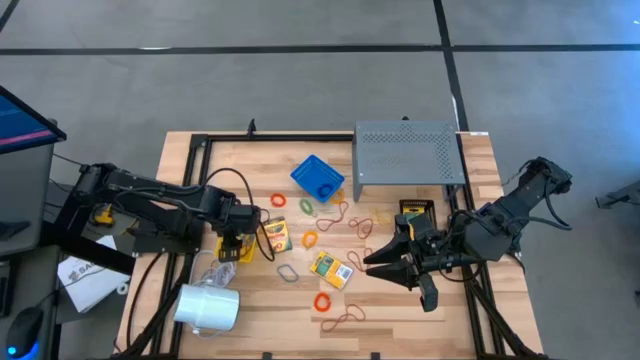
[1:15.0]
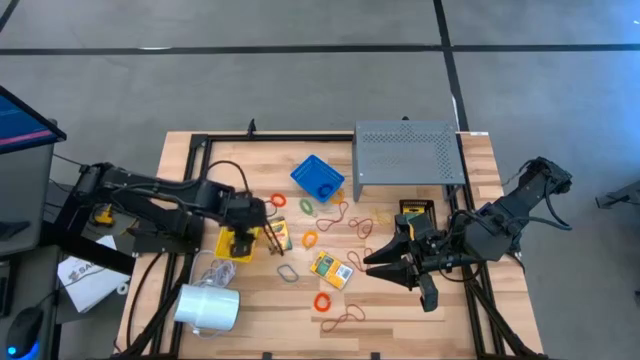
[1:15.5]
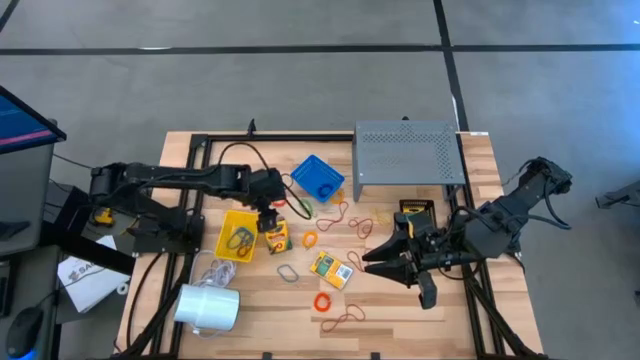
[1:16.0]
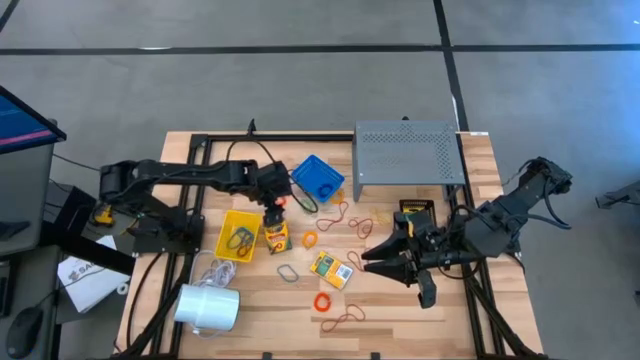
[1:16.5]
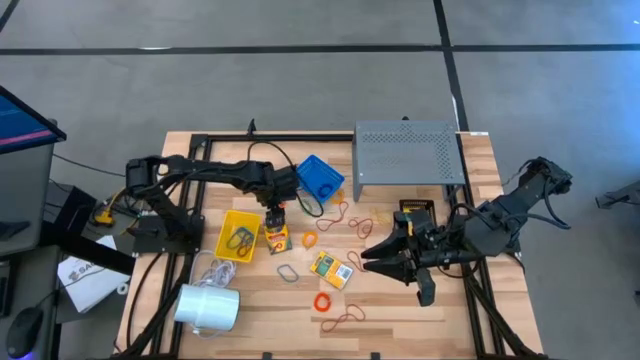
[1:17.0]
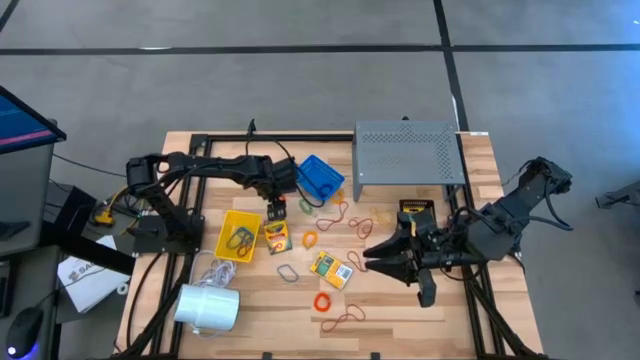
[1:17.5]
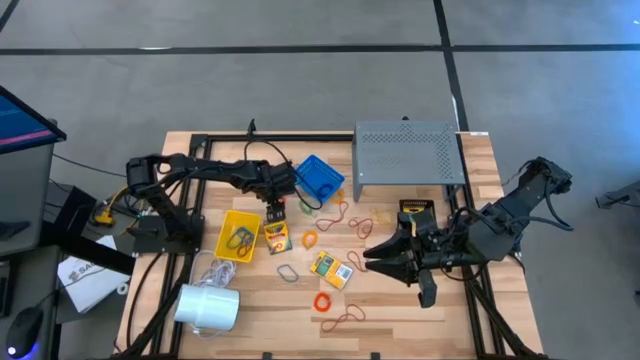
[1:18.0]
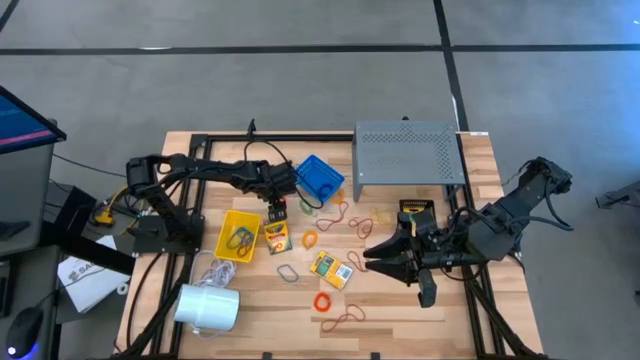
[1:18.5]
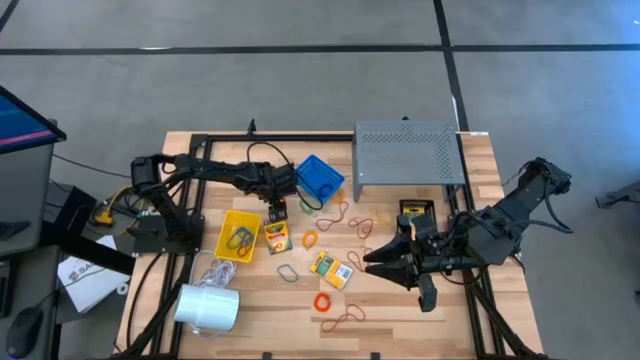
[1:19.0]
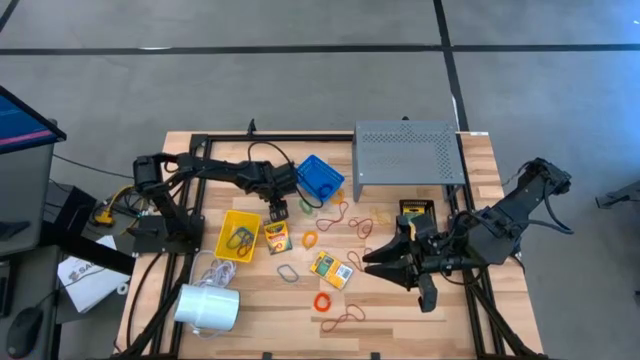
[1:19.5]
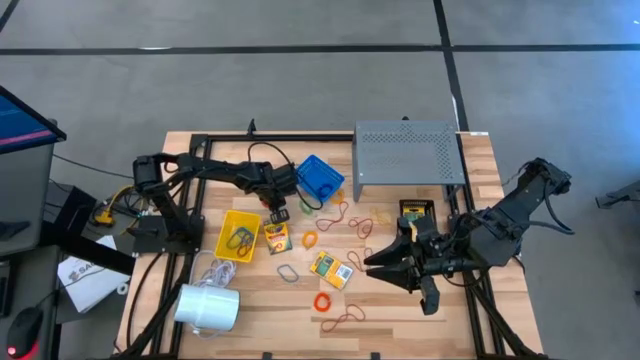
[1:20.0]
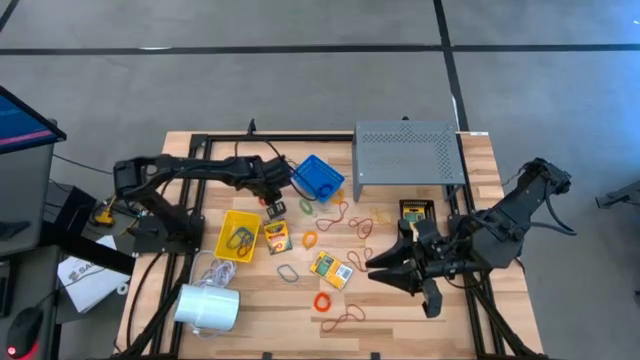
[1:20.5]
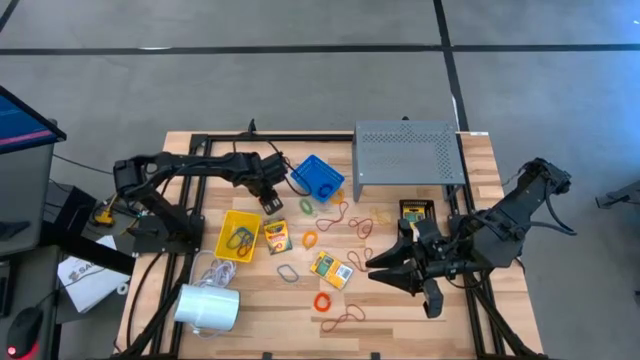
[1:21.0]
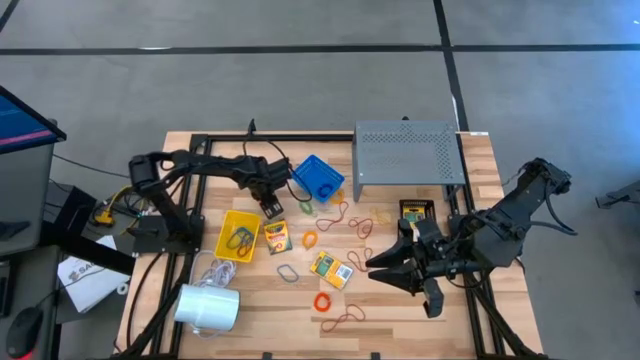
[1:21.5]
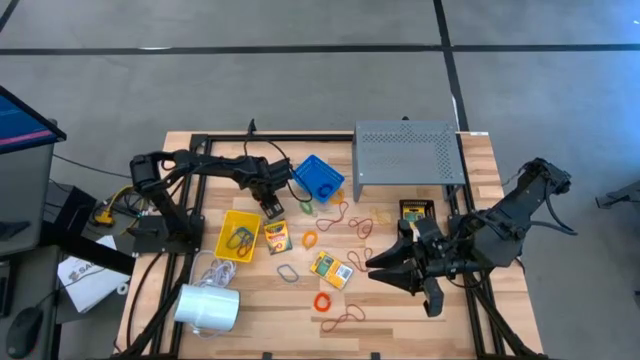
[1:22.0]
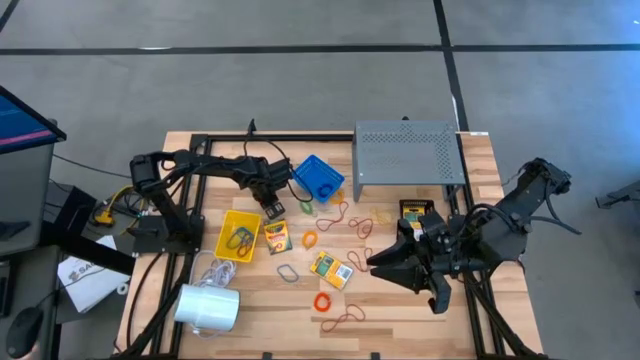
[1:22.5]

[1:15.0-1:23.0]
Task: Pick & Place Office Desk Supplies
Put the top orange spring keychain into the blue bin

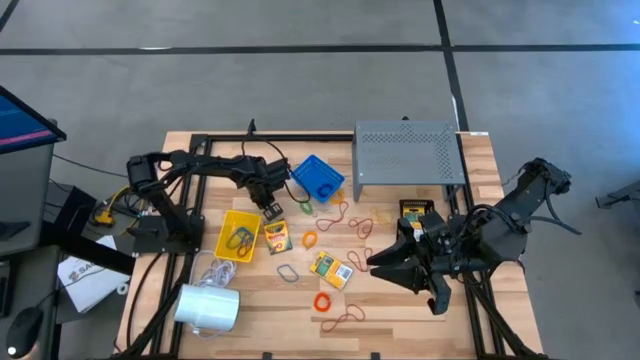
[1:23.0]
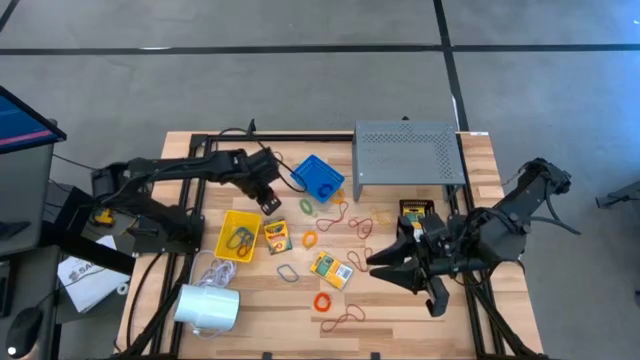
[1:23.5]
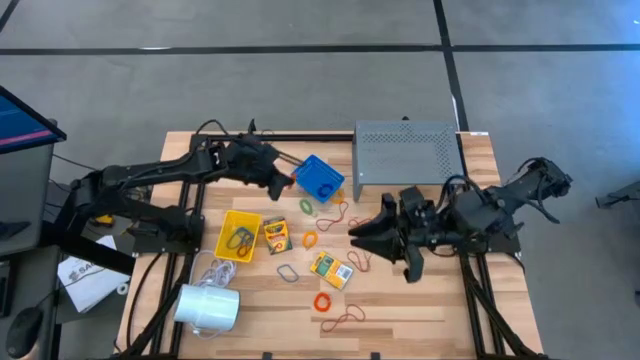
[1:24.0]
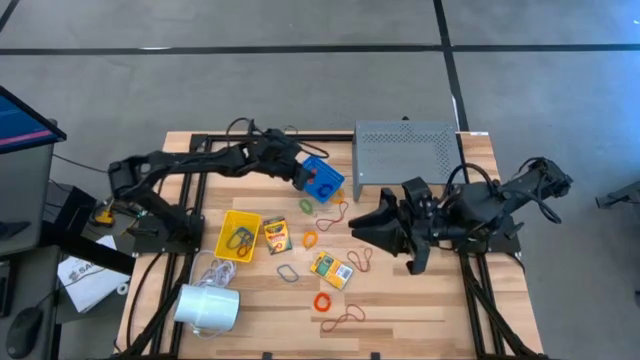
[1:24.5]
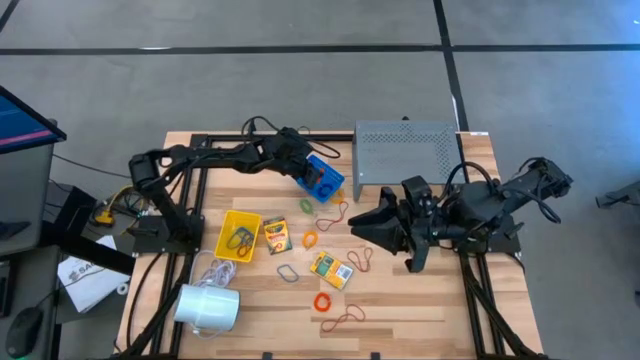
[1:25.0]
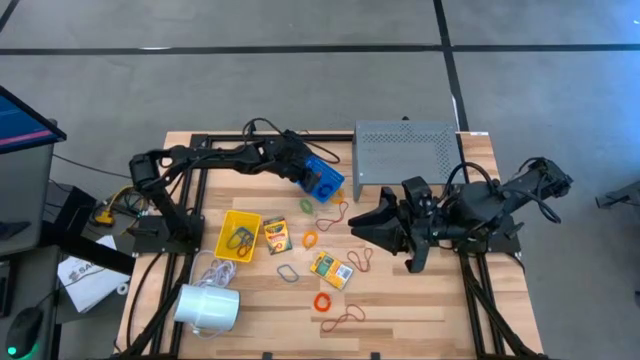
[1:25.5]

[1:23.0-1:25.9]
Put the top orange spring keychain into the blue bin

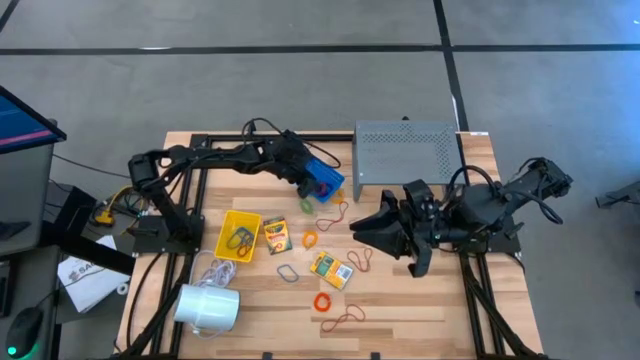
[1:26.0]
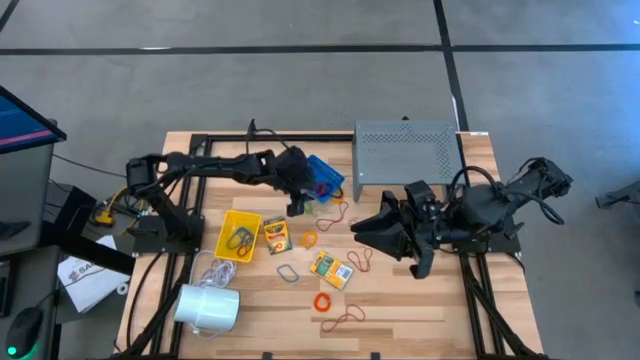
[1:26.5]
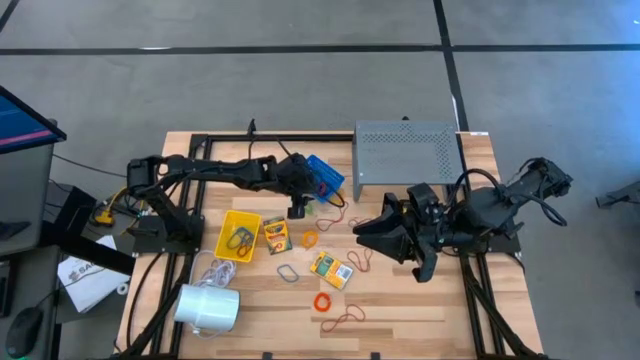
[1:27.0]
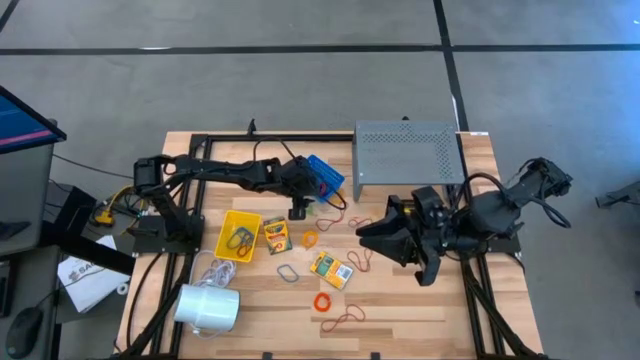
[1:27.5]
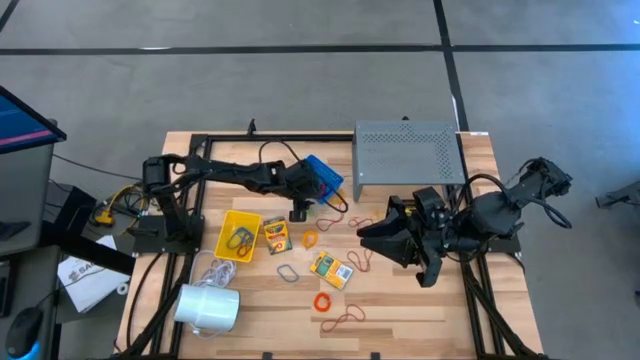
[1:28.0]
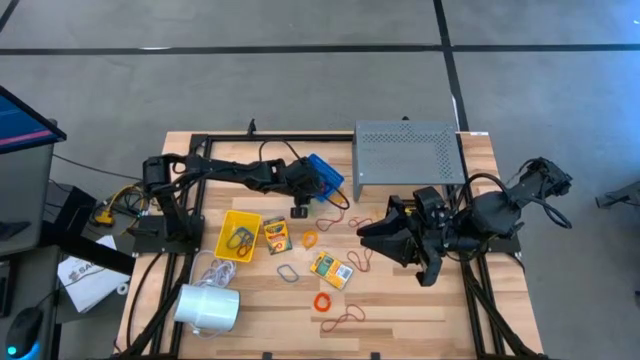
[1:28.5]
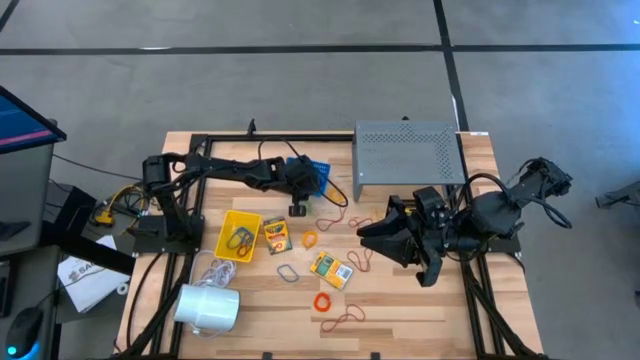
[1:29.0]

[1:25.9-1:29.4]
Adjust the blue bin on the table

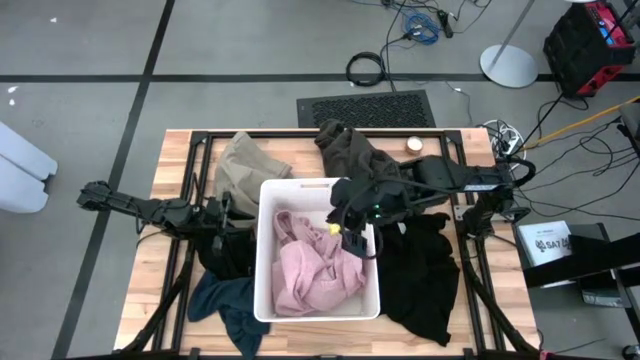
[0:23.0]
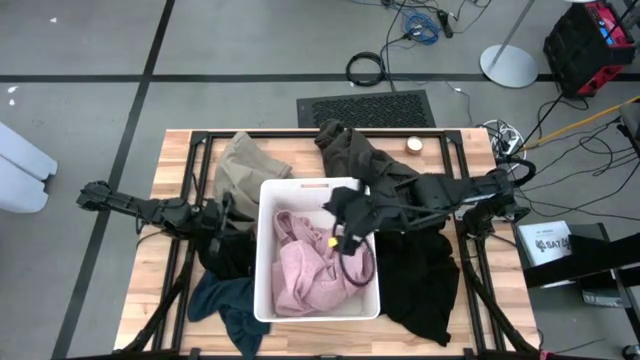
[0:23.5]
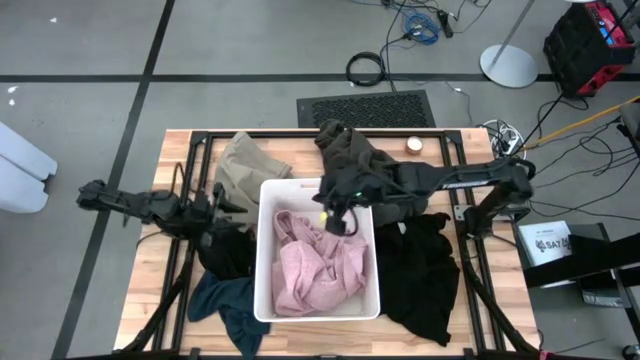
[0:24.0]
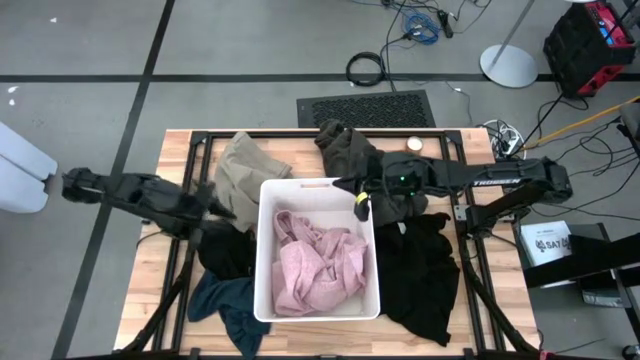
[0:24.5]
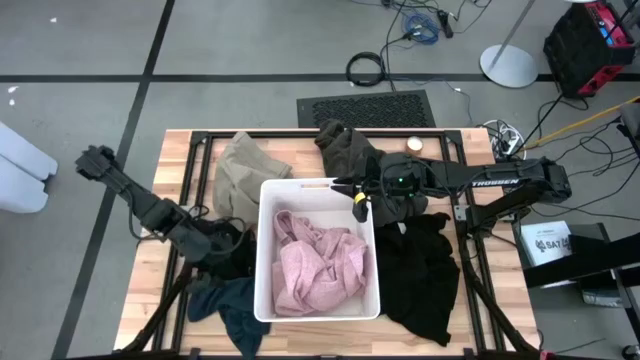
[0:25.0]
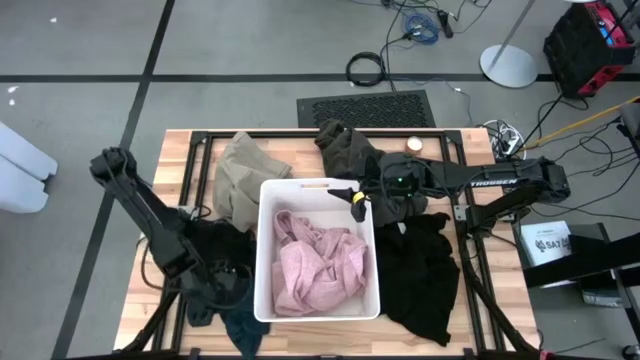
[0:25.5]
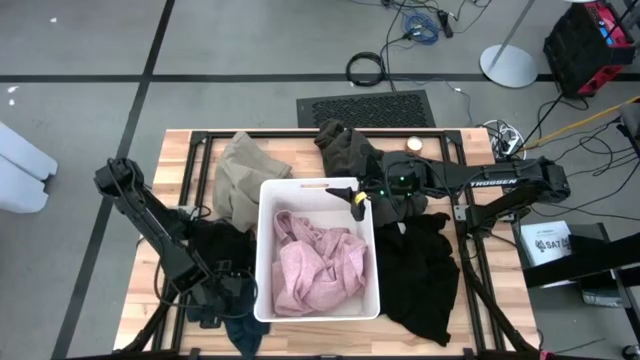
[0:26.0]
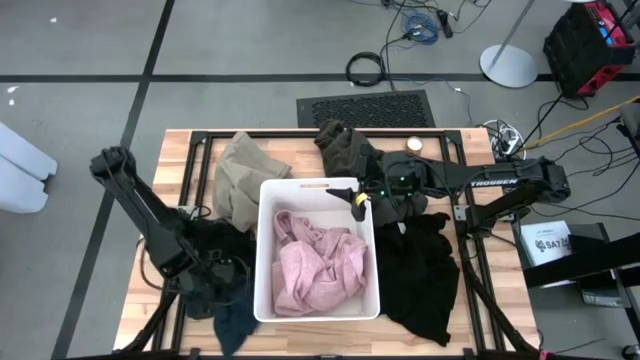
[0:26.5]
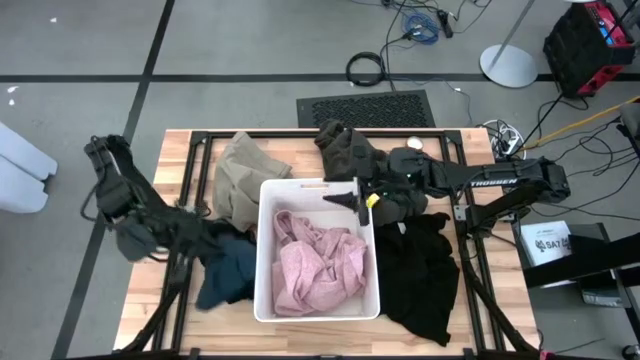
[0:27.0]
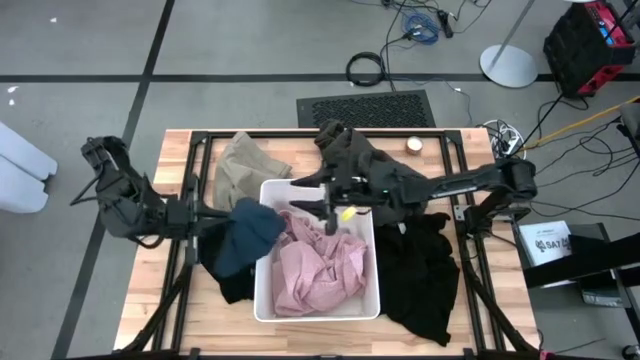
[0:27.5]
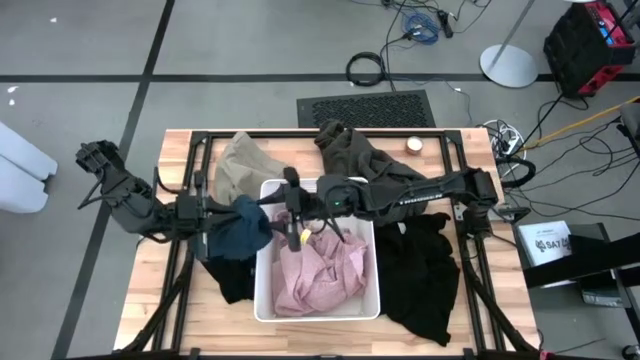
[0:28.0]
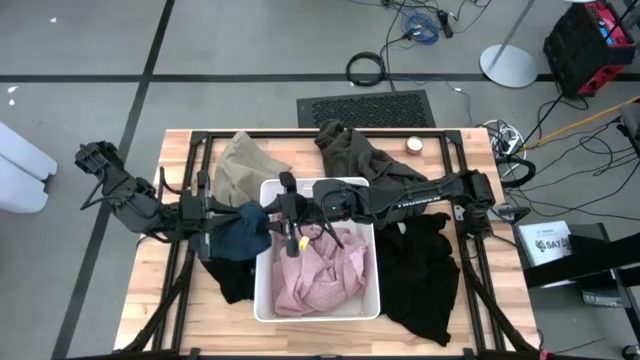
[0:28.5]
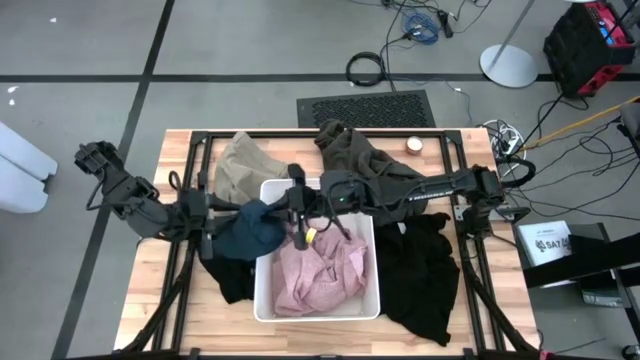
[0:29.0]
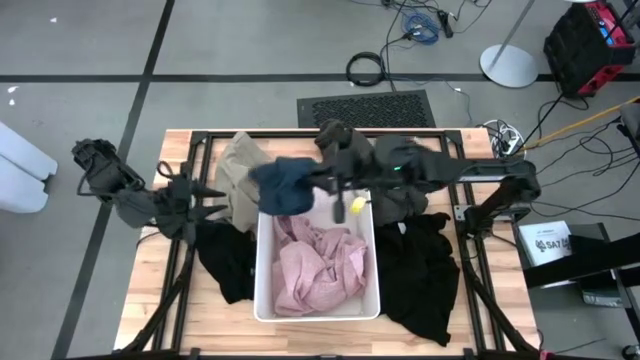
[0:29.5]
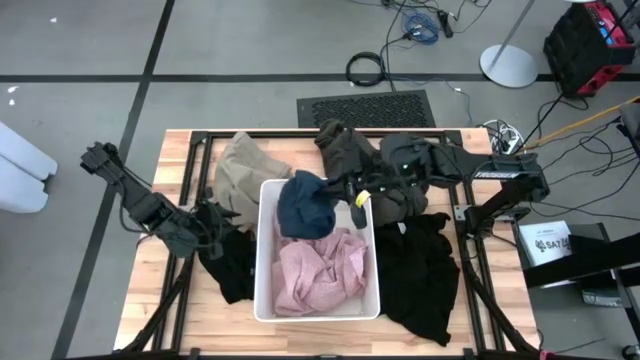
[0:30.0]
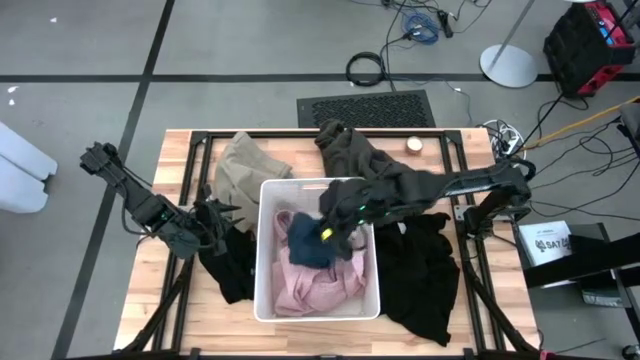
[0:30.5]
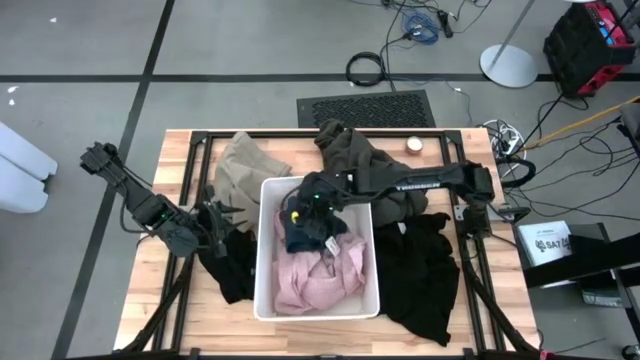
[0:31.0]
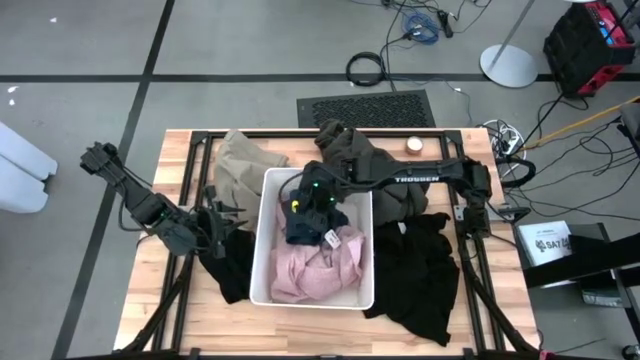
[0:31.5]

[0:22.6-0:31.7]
Task: Sort clothes
Put the dark blue shorts into the white laundry bin
